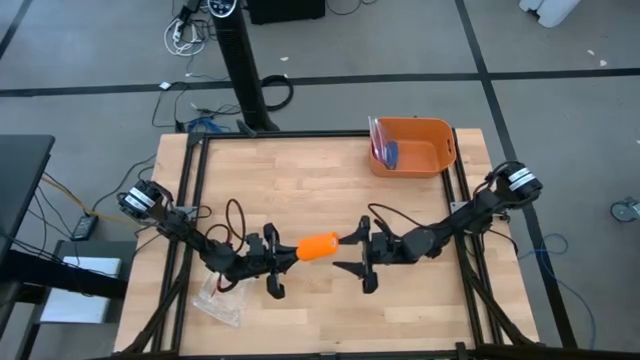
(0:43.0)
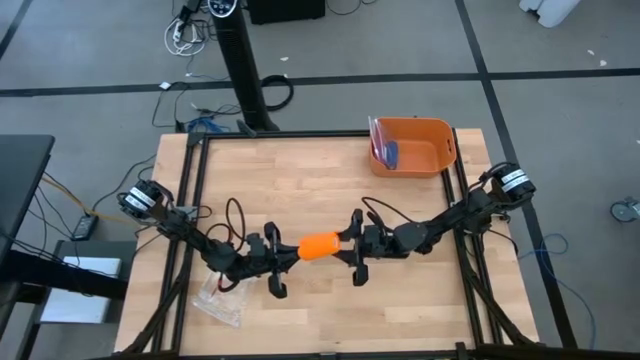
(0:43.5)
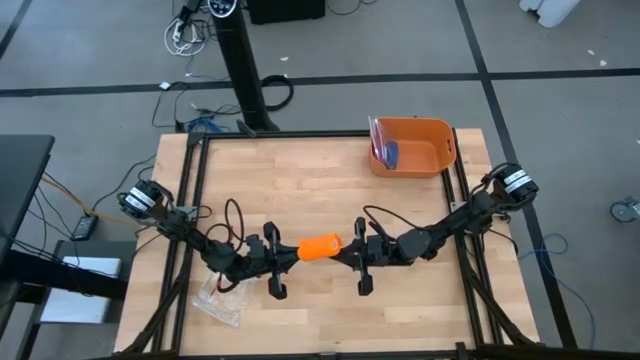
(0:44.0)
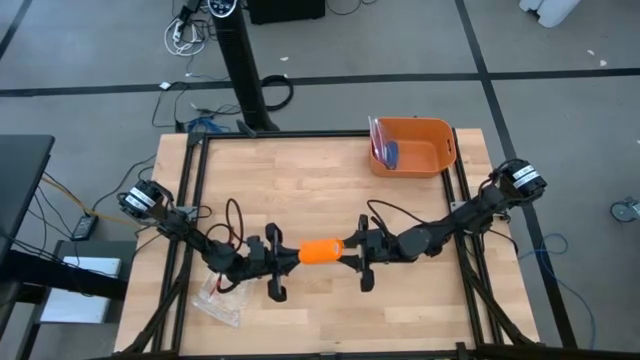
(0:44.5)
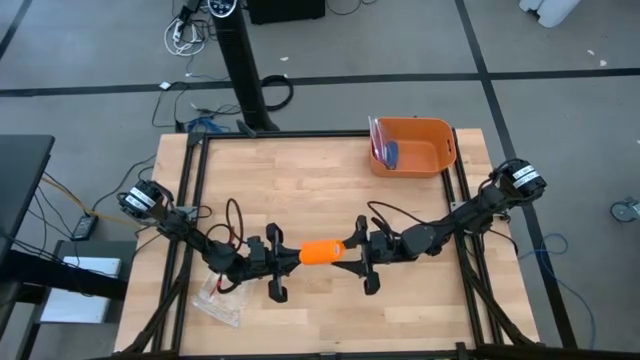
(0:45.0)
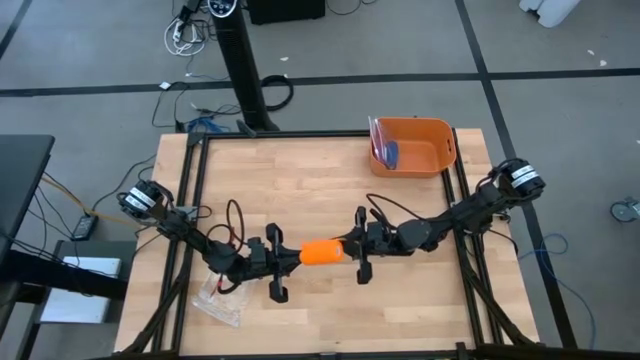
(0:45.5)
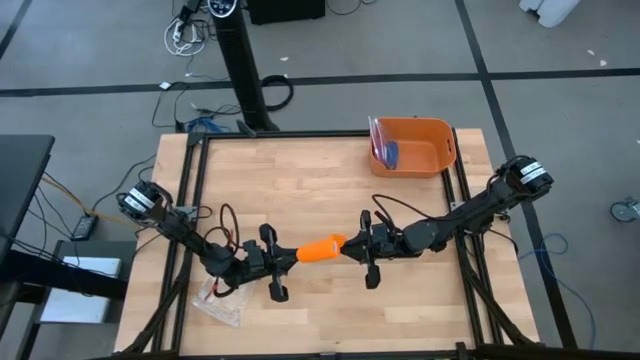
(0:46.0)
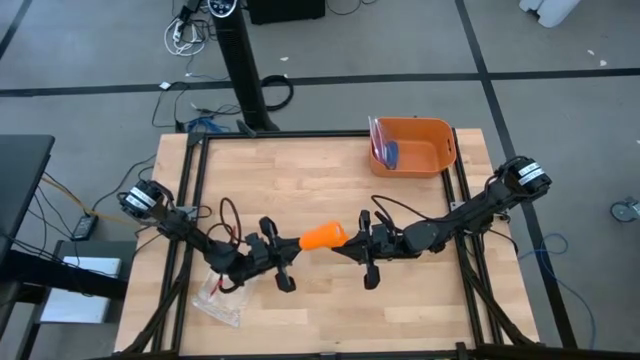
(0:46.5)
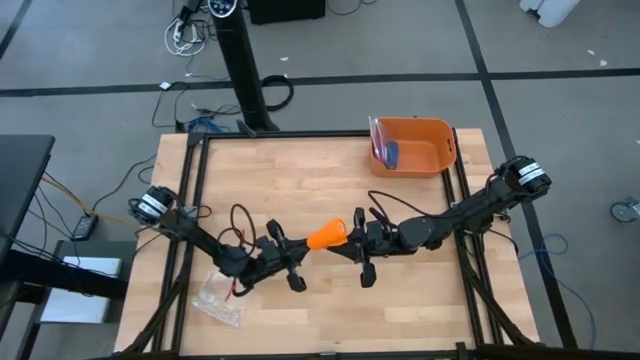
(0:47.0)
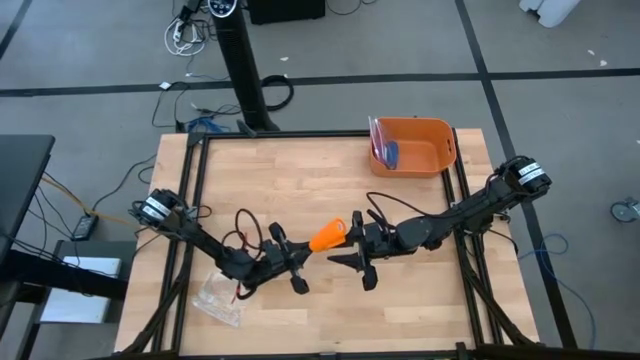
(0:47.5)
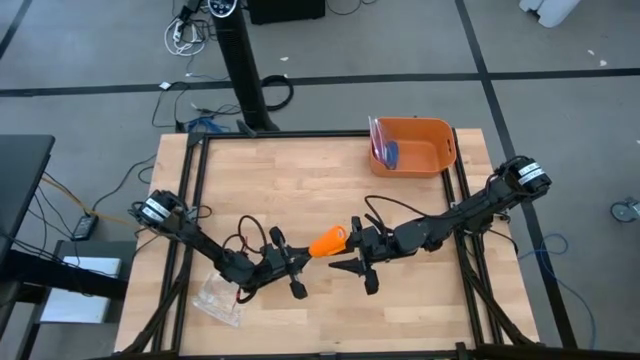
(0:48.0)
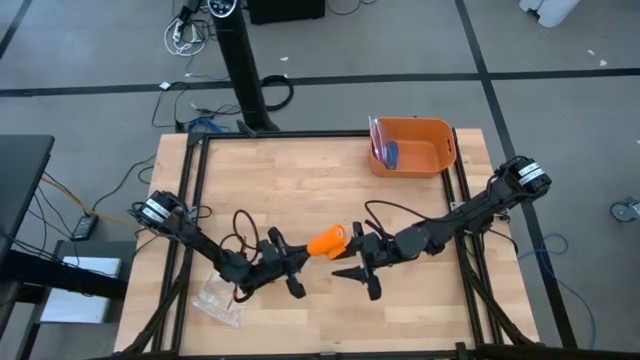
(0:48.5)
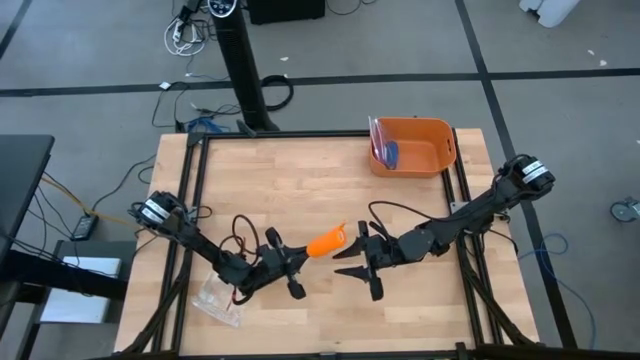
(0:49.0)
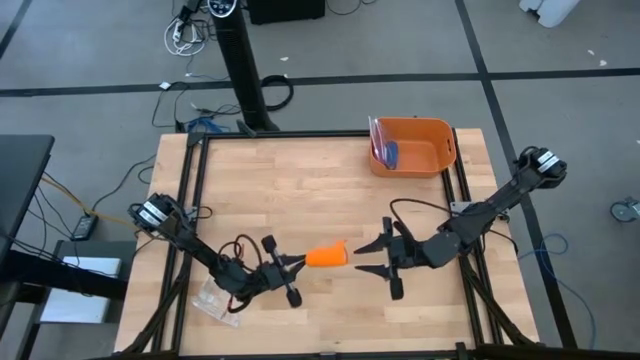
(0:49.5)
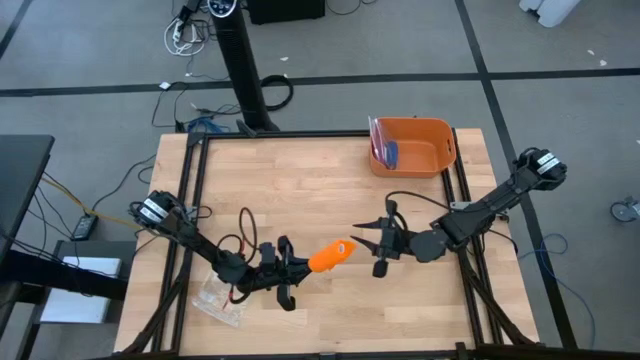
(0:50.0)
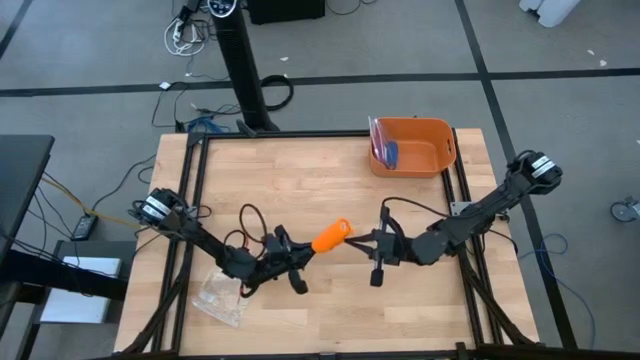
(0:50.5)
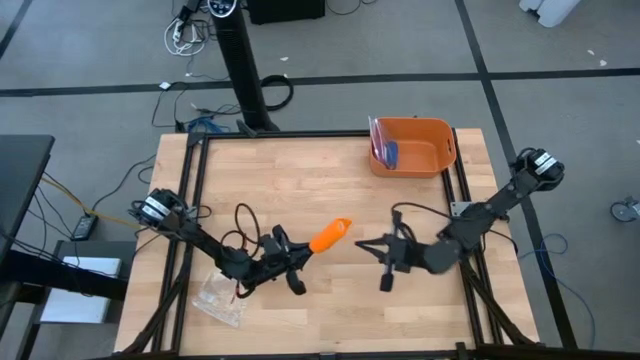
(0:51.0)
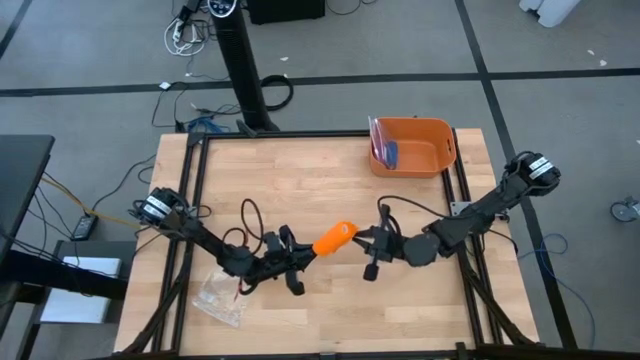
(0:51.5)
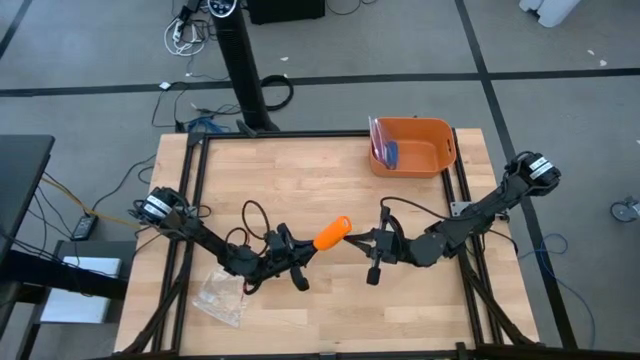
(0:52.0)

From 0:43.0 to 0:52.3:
Task: Roll bandage
Roll the orange bandage

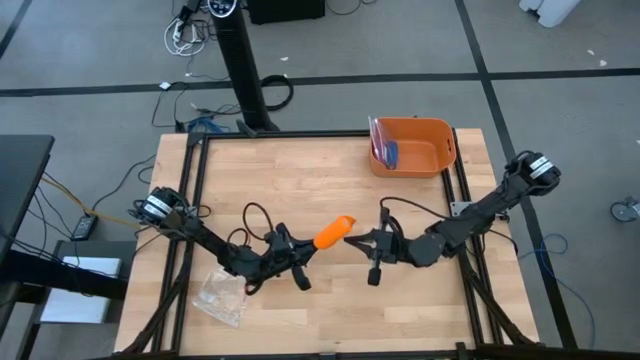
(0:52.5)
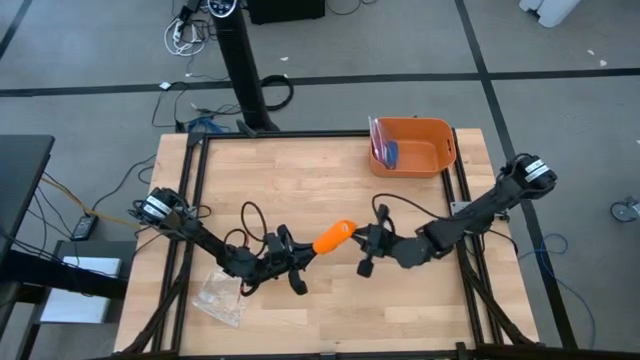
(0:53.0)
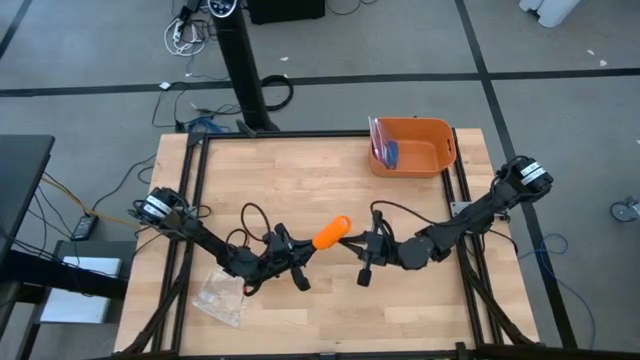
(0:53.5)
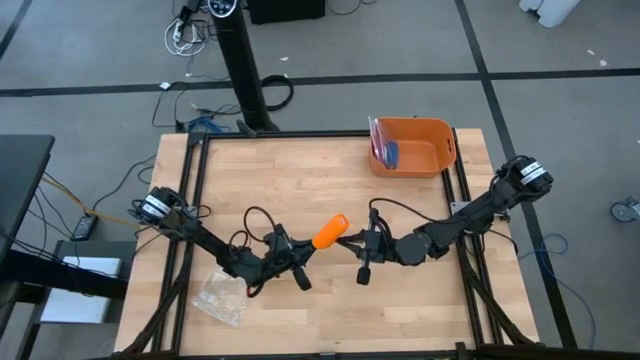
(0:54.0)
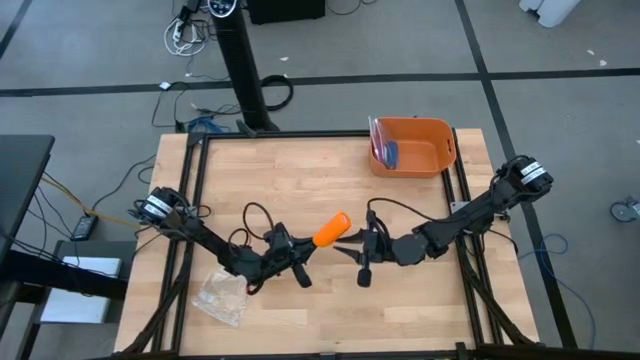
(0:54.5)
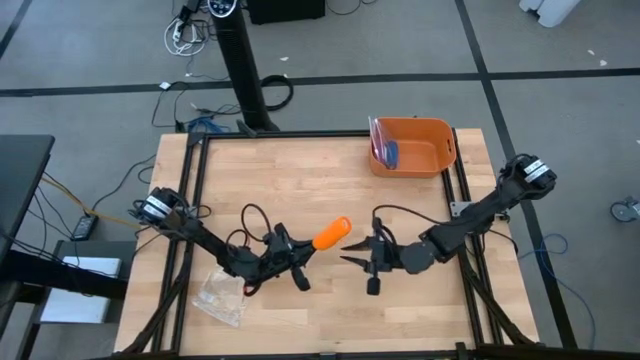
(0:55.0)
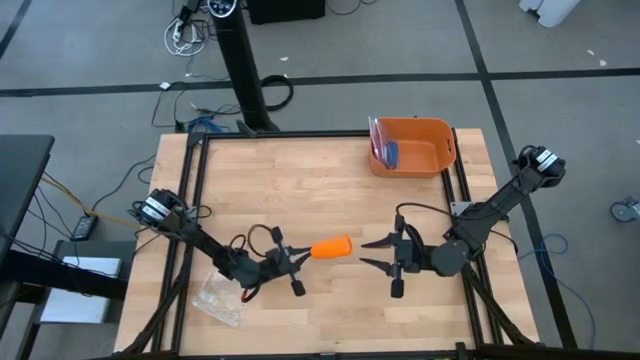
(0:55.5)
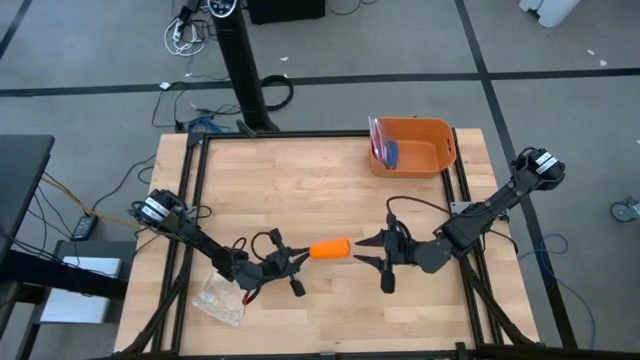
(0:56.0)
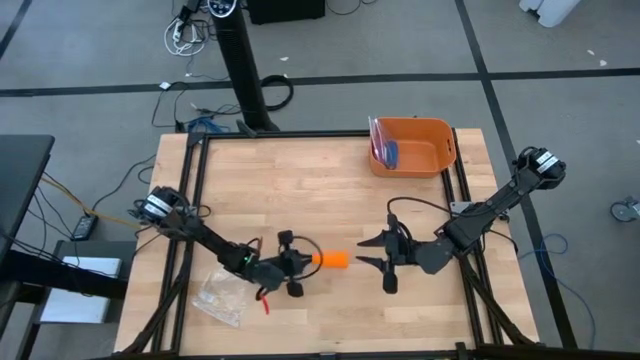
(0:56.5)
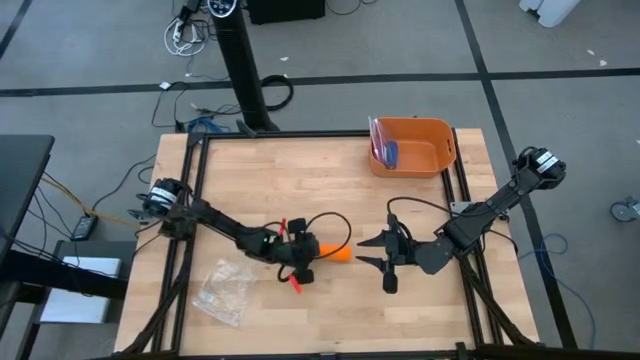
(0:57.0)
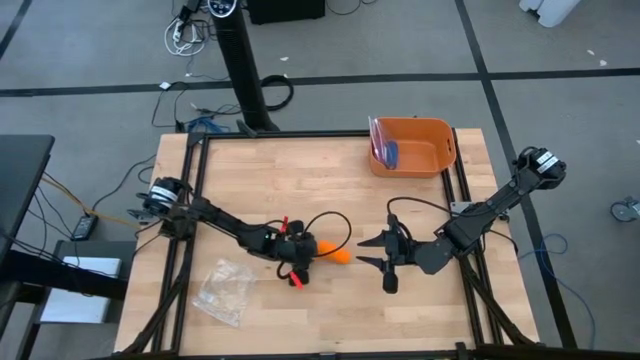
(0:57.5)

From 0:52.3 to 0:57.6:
Roll the orange bandage

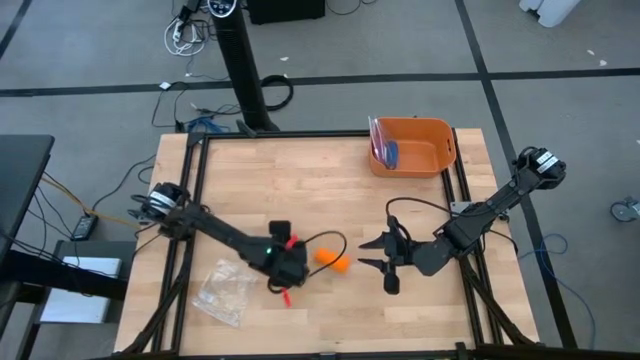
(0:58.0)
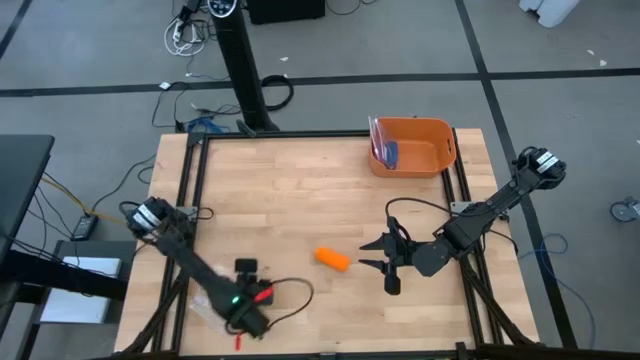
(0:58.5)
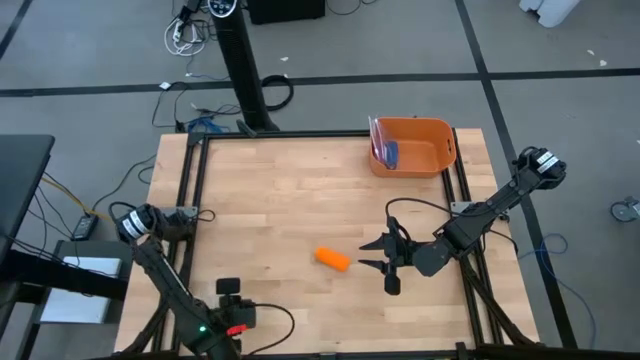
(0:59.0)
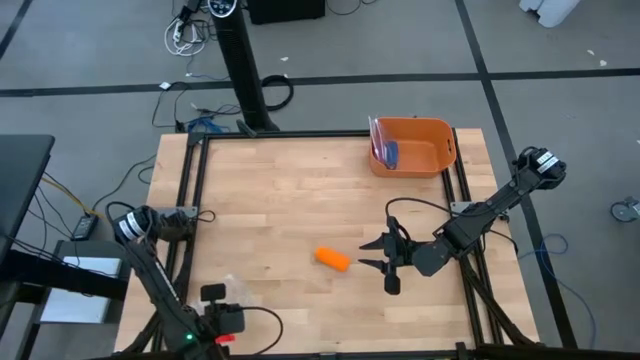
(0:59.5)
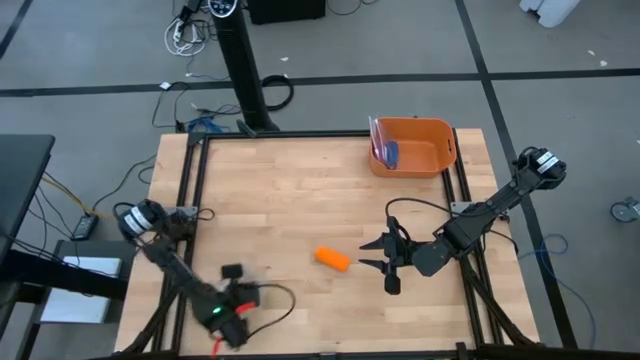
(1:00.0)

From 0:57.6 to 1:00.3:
Prepare the transparent zip bag

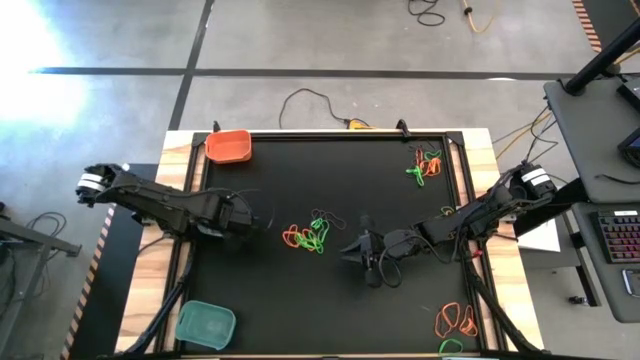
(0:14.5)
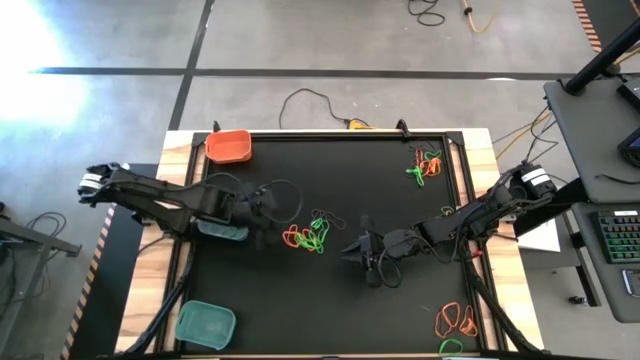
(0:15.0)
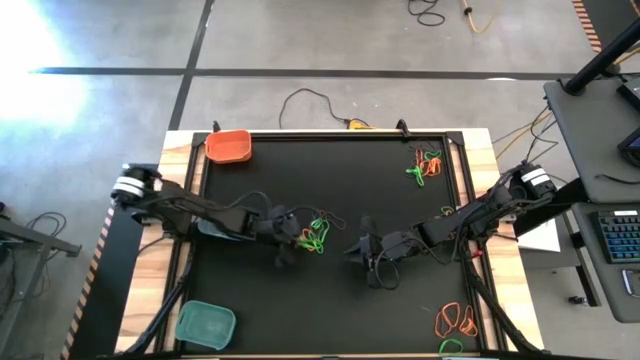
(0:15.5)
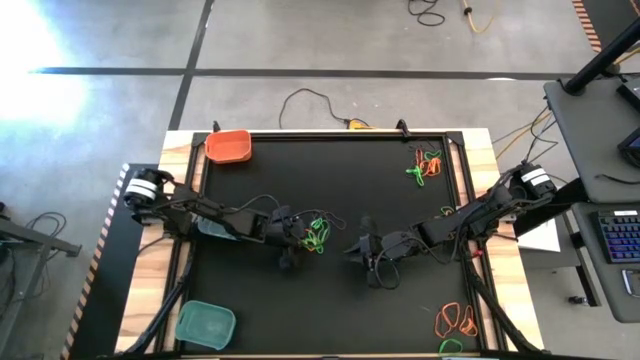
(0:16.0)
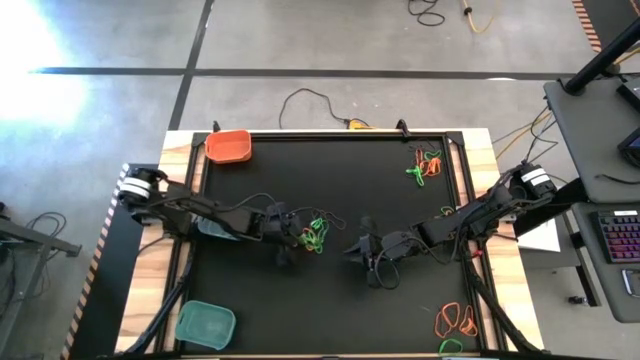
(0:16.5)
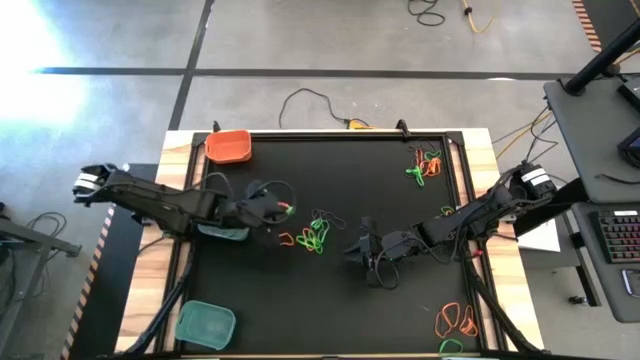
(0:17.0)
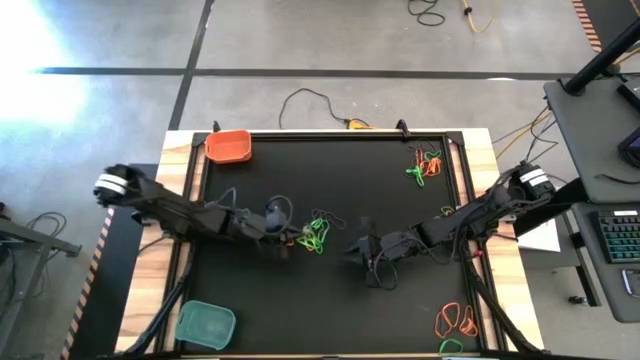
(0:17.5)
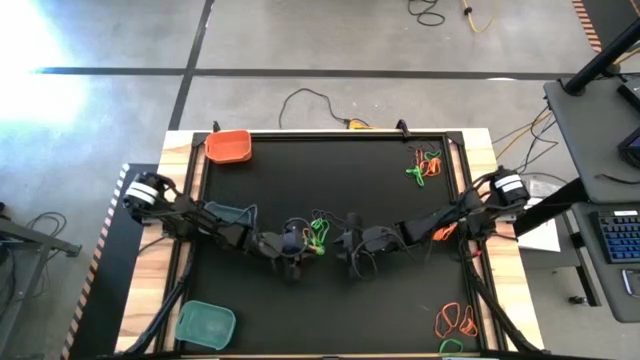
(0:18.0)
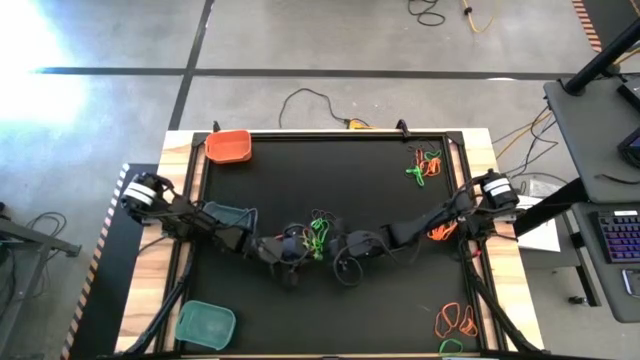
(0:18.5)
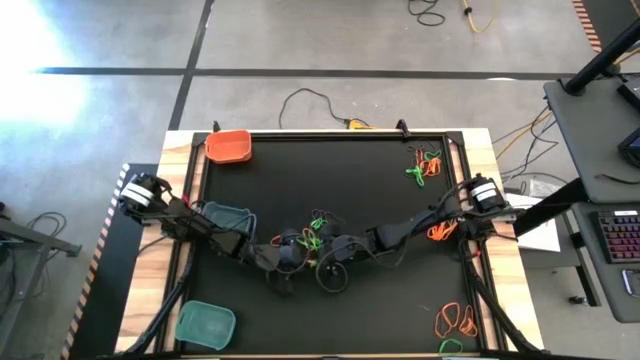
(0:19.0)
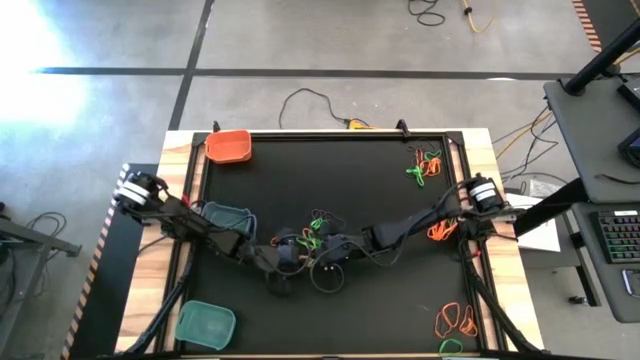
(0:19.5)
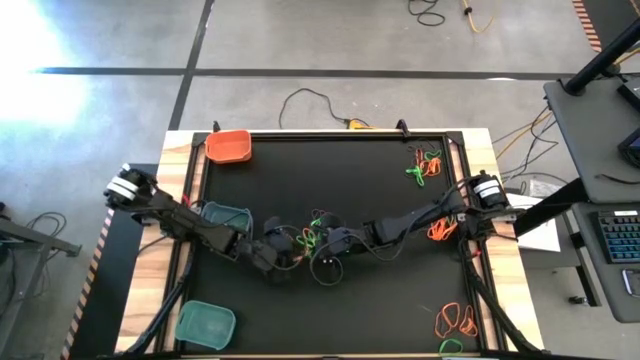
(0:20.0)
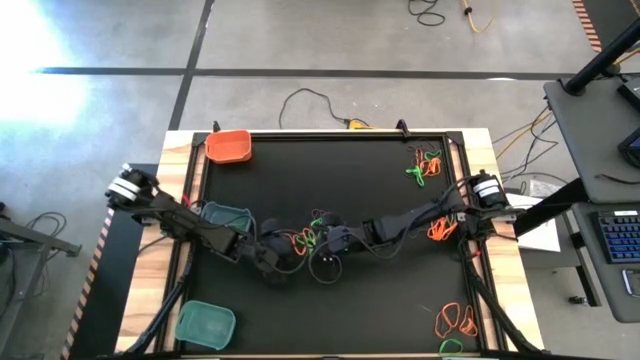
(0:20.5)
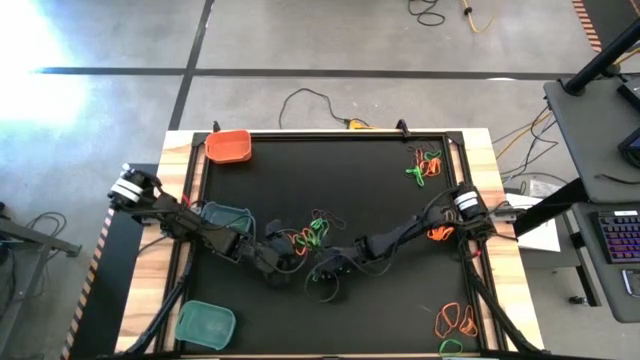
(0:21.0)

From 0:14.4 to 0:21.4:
Task: Sort rubber bands into baskets
Put the green rubber band into the blue bin
